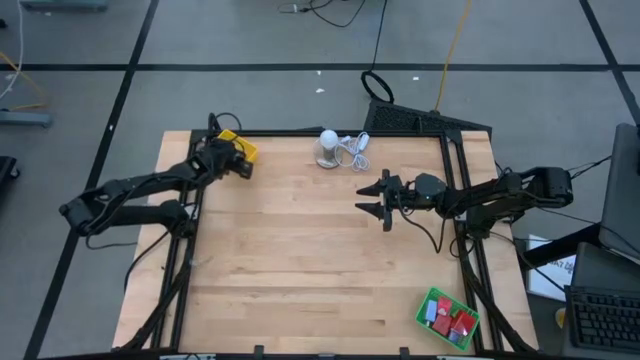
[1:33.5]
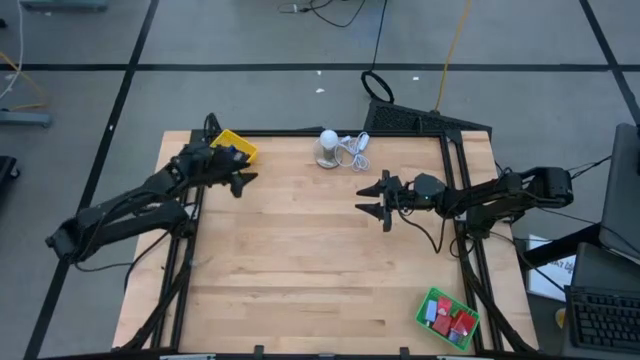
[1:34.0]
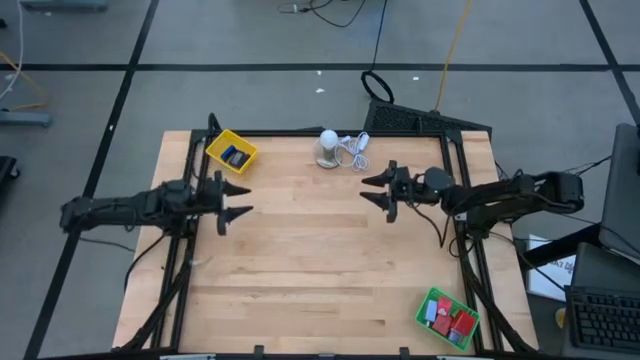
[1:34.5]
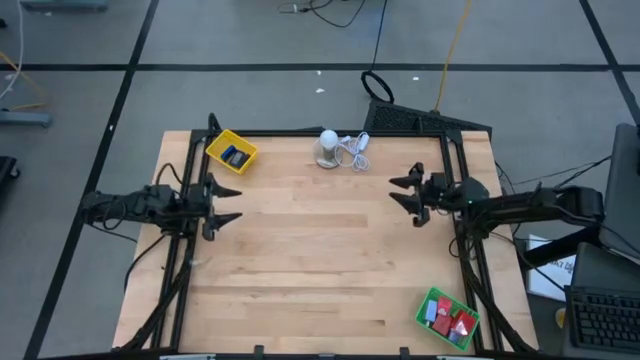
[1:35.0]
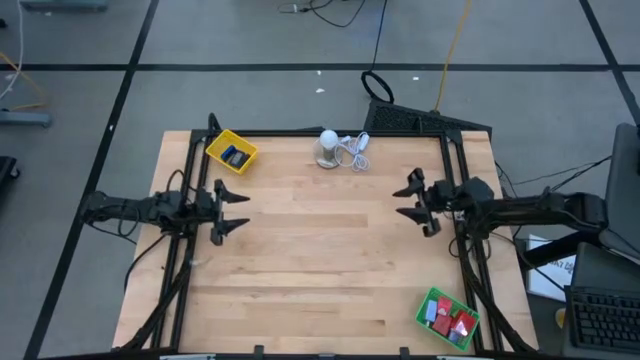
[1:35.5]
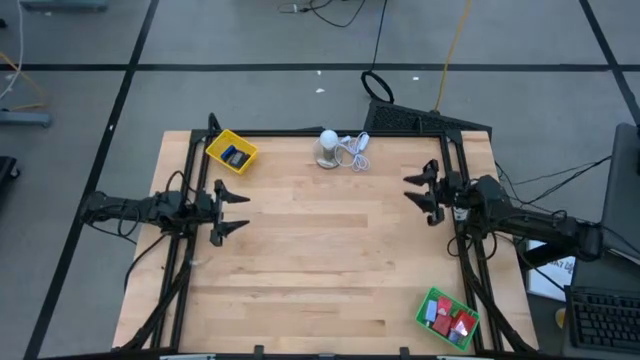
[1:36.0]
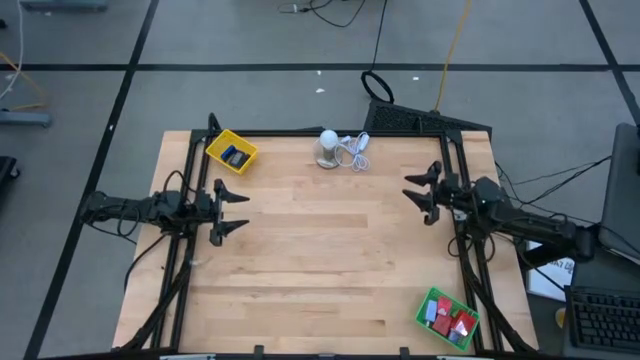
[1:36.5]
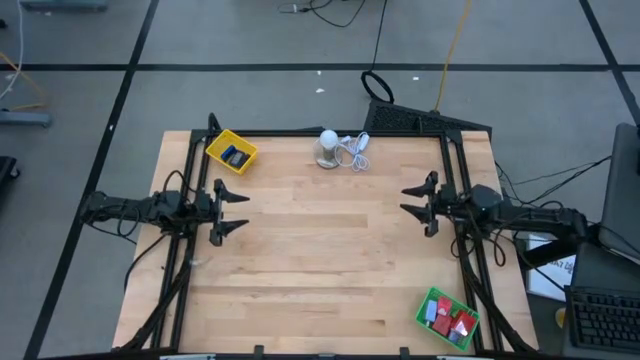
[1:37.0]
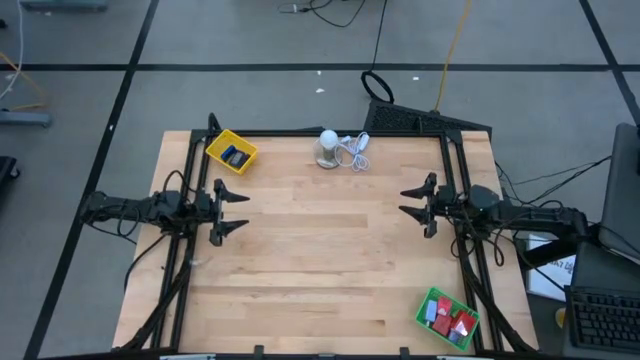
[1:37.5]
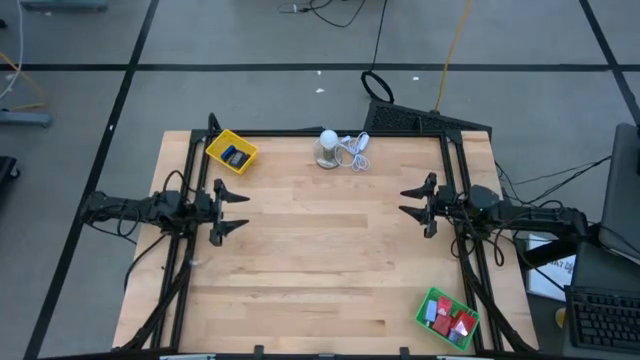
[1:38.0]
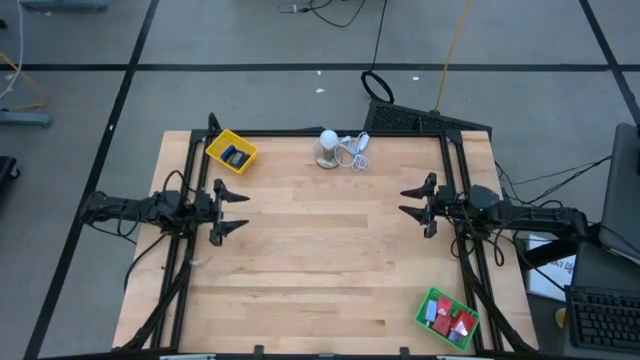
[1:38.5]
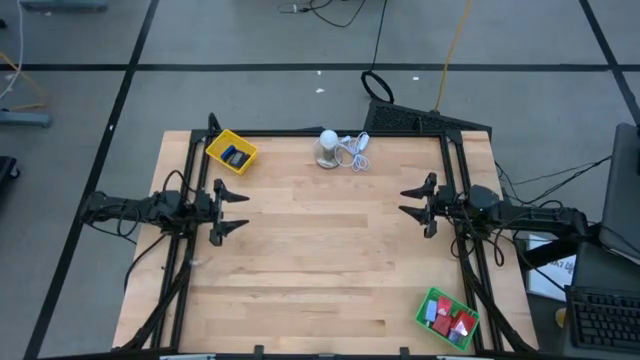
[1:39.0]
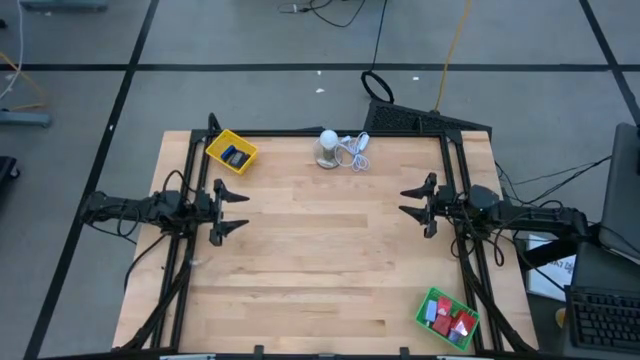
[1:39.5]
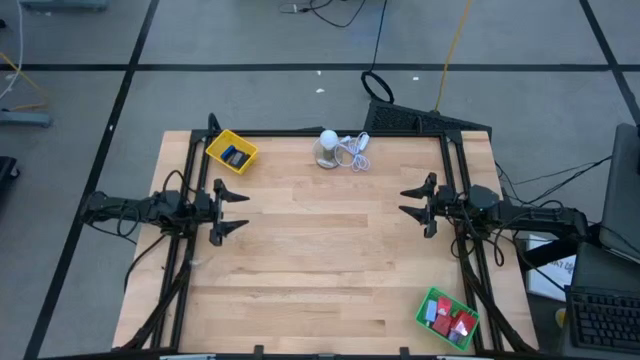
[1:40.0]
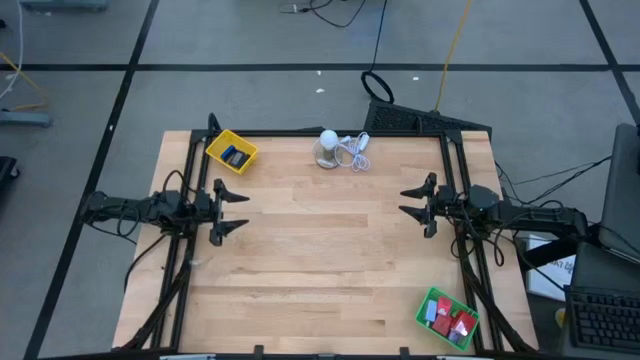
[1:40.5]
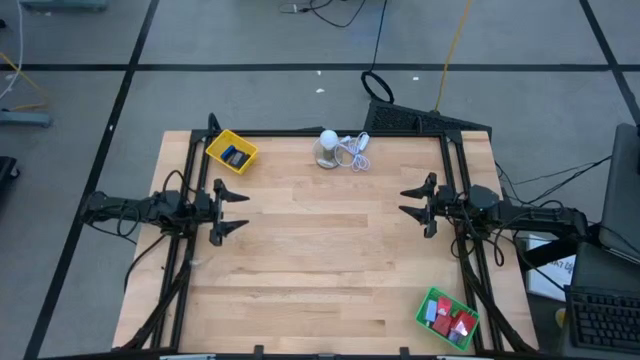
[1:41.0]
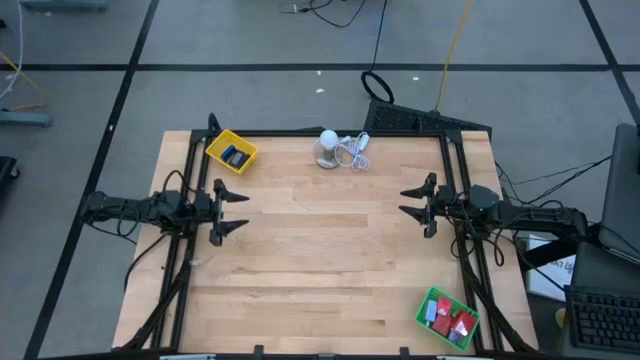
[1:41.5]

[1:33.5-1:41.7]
Task: Pick & Place Office items
Return to Home Position

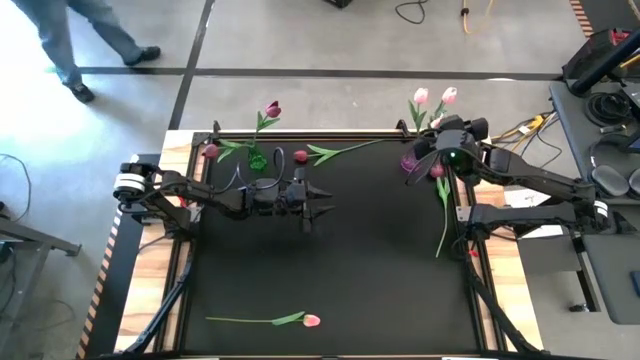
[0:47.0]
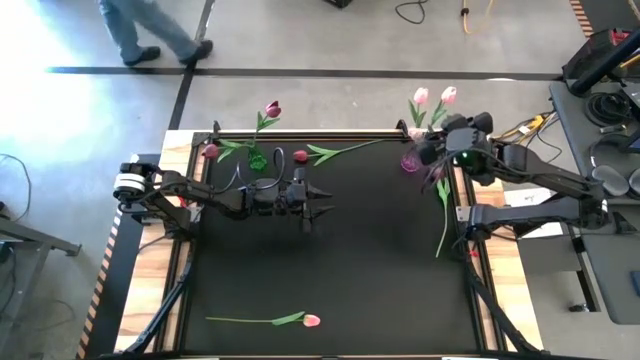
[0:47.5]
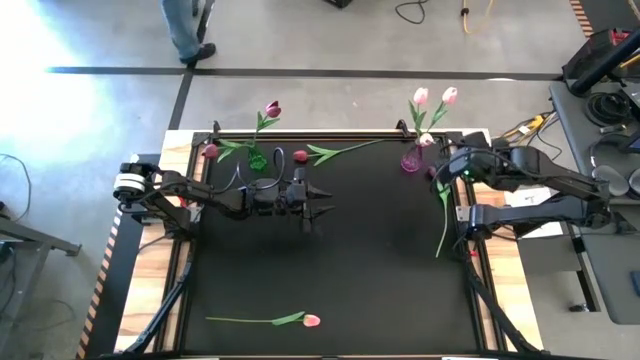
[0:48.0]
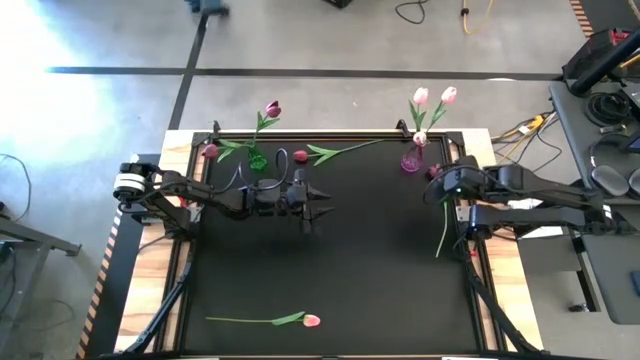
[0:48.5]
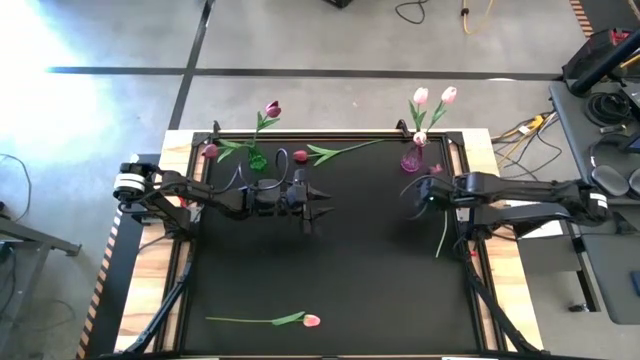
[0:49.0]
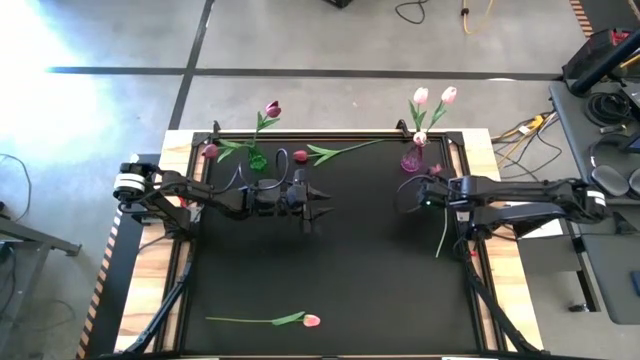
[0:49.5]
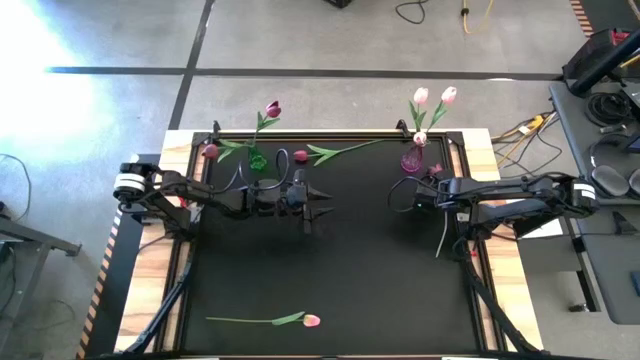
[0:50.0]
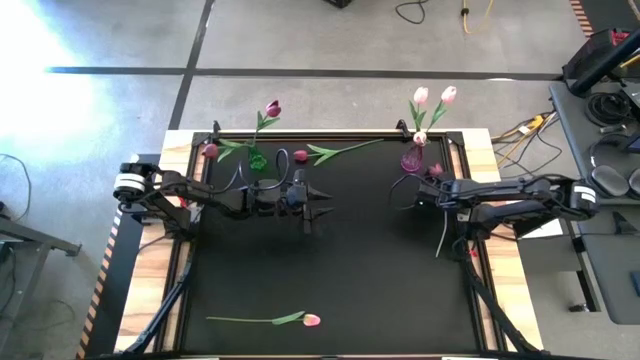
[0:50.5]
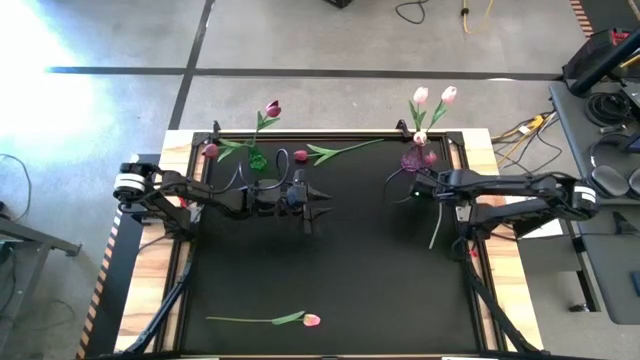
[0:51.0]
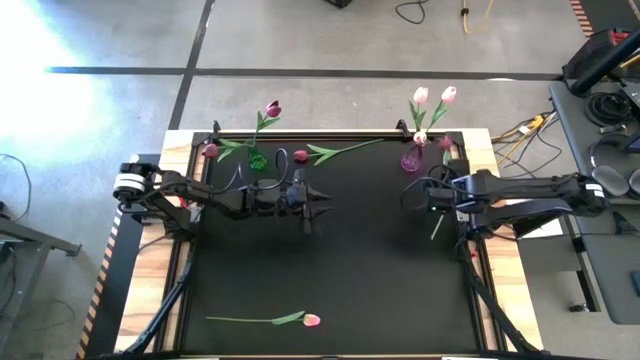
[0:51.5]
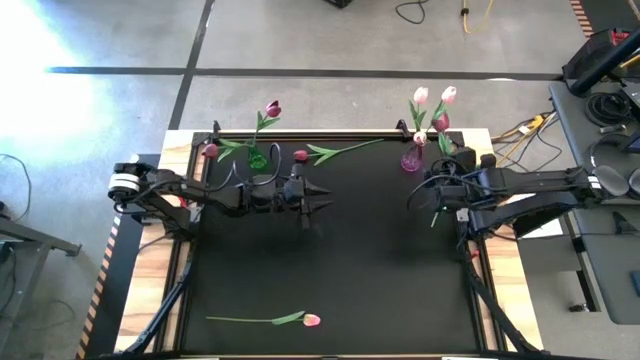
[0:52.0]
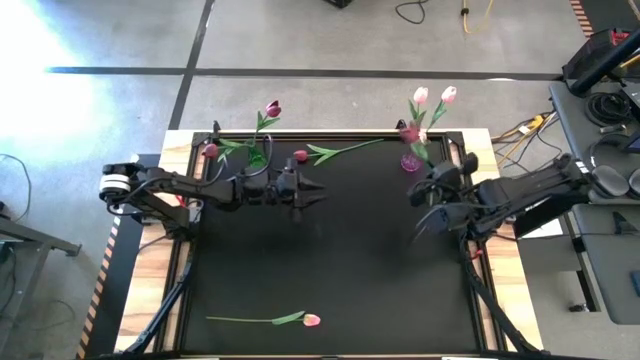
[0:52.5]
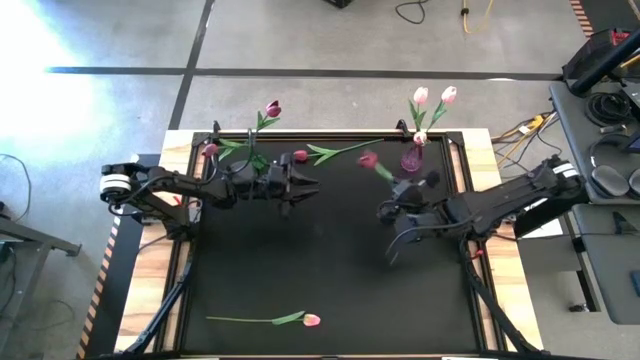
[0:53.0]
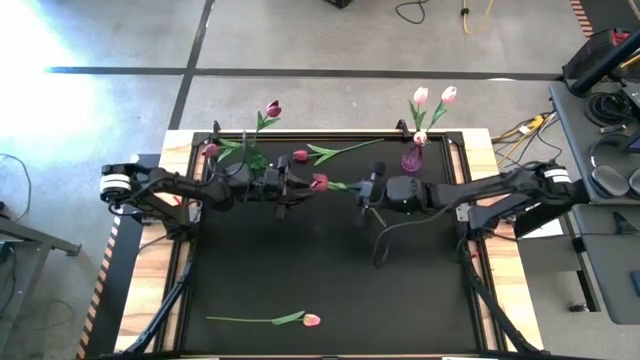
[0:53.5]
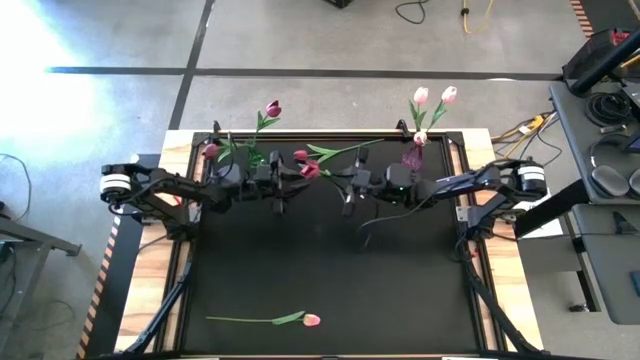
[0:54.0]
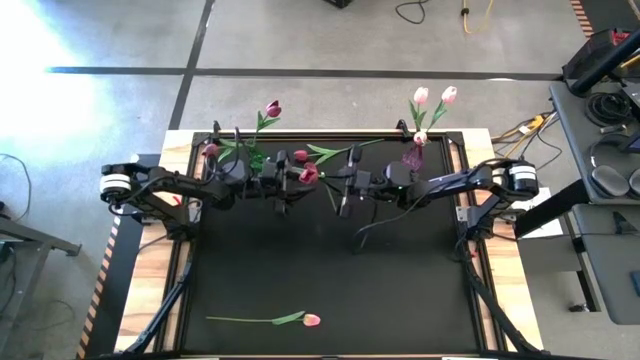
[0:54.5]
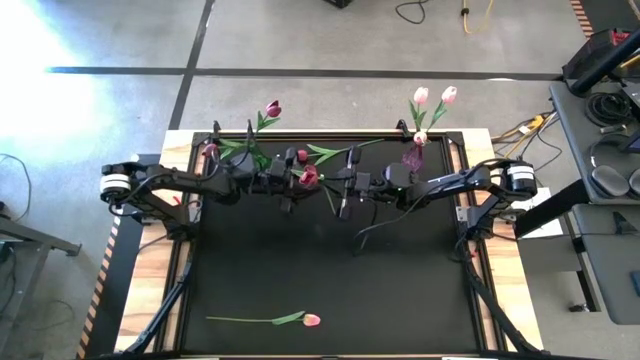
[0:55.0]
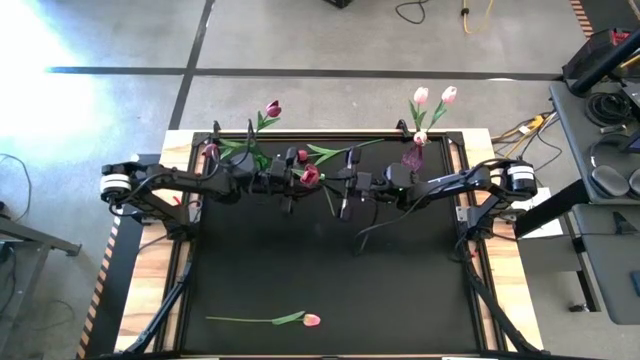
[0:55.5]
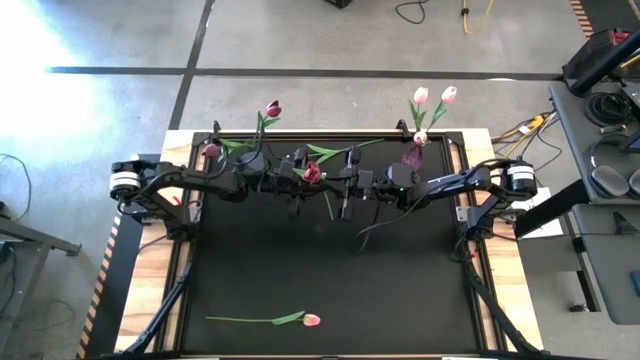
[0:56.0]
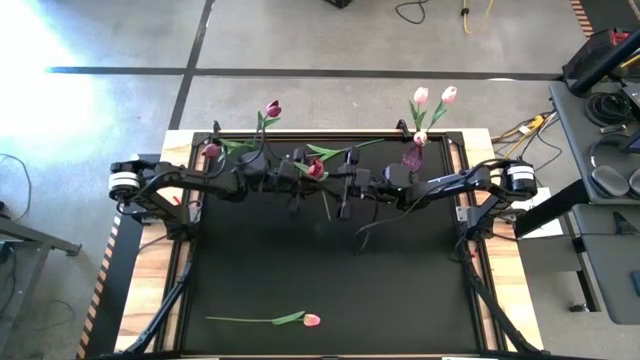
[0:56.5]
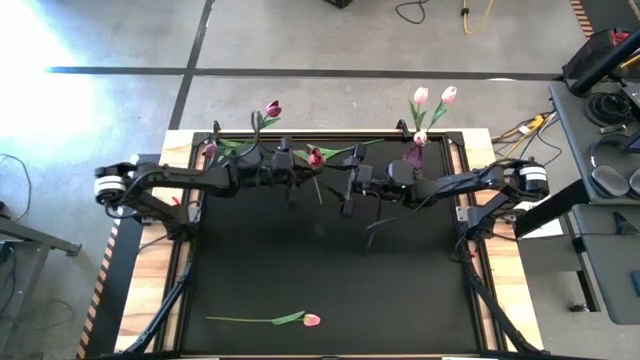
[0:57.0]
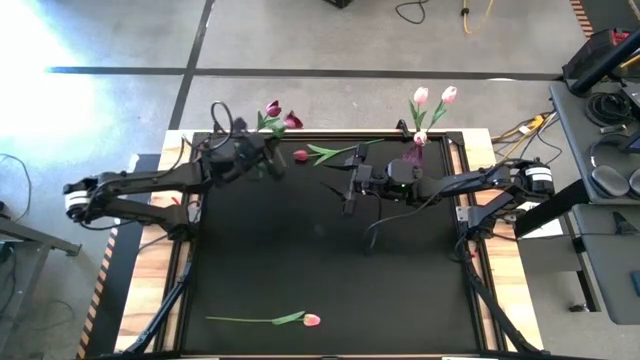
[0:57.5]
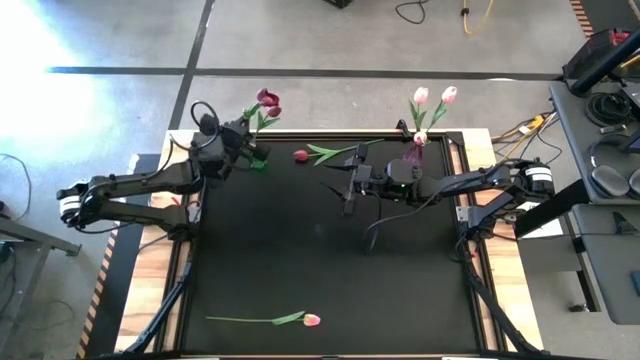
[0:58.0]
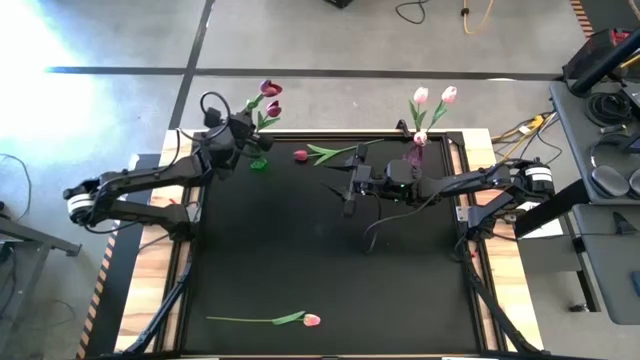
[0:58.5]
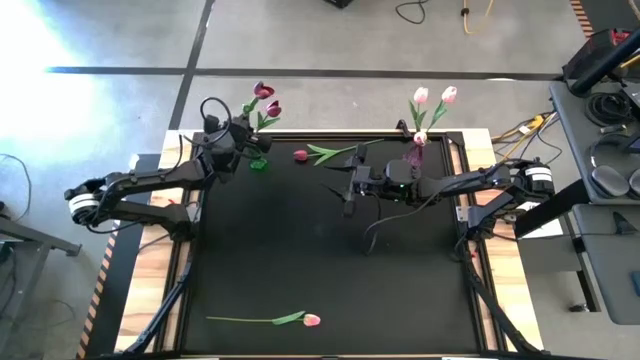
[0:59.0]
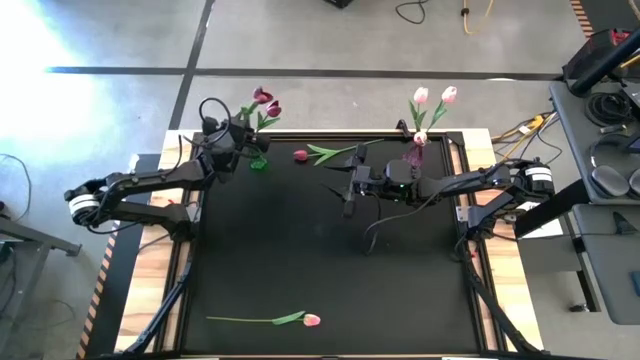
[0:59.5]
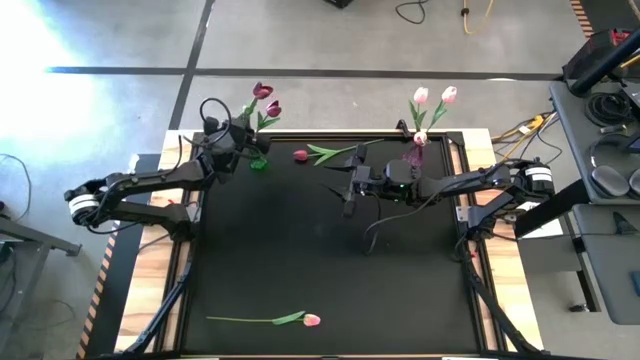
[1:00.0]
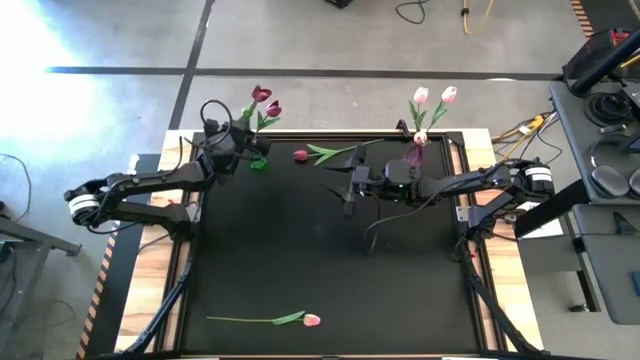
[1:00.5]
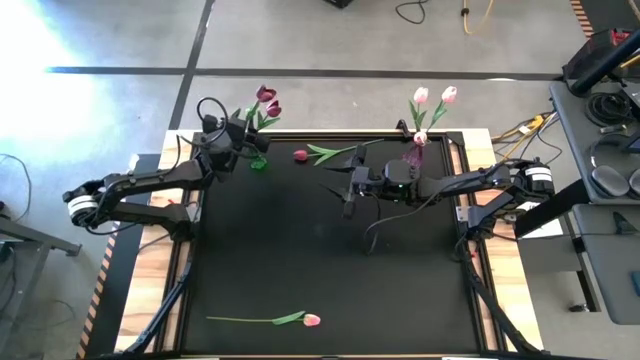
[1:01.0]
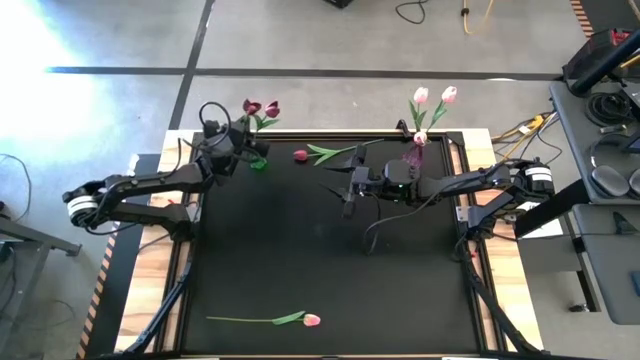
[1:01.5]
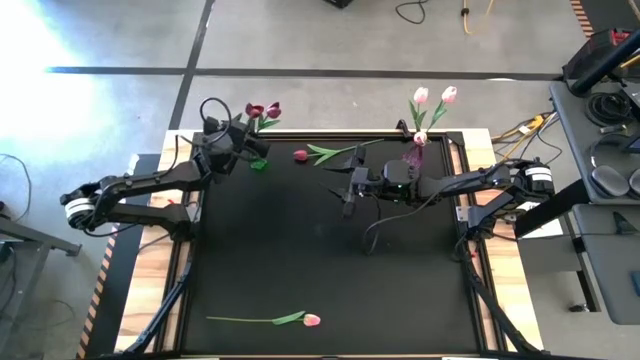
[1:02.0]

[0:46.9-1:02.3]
Task: Sort flowers into vase by color
Put the red flower into the green vase
